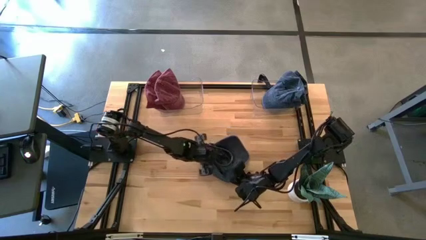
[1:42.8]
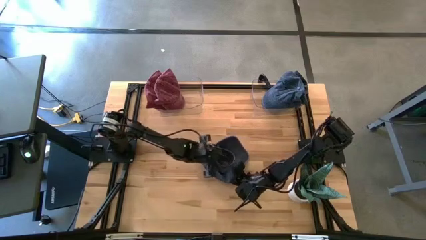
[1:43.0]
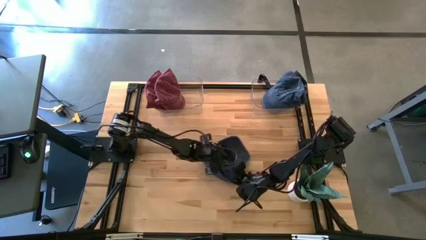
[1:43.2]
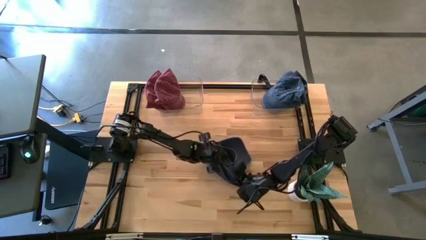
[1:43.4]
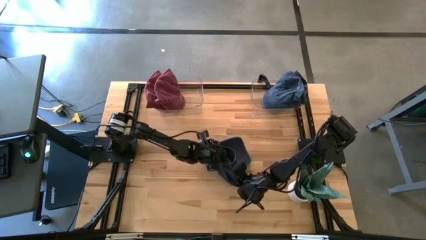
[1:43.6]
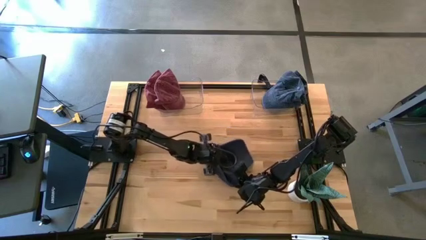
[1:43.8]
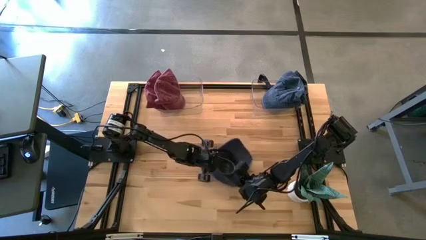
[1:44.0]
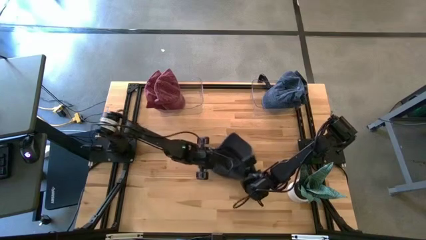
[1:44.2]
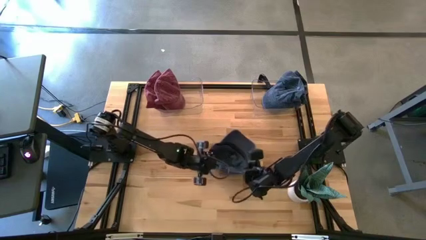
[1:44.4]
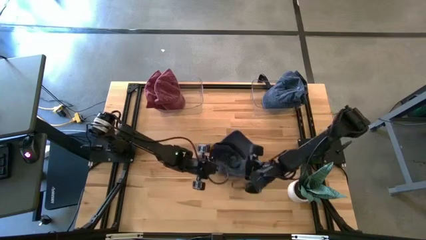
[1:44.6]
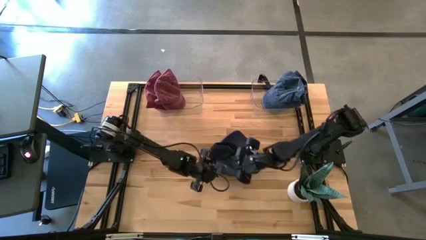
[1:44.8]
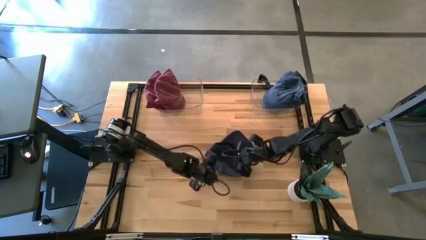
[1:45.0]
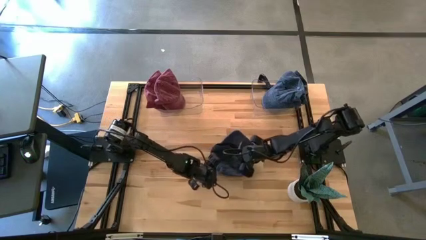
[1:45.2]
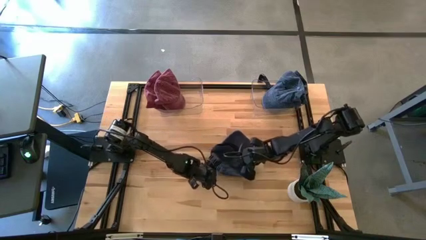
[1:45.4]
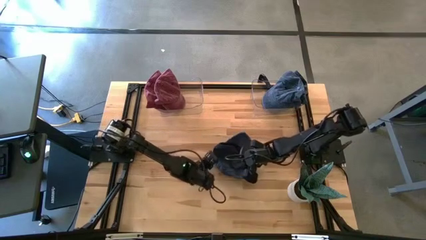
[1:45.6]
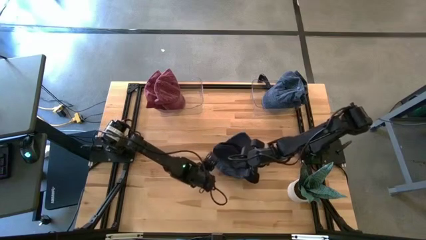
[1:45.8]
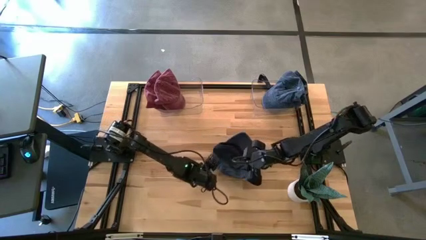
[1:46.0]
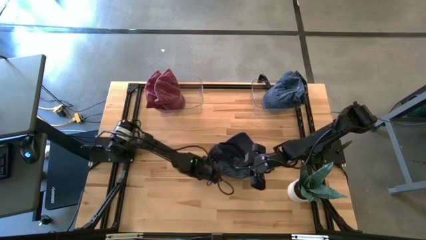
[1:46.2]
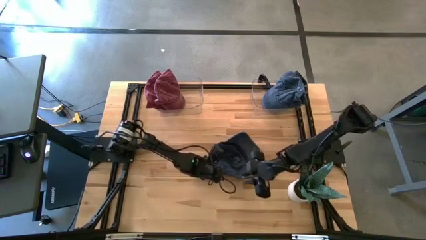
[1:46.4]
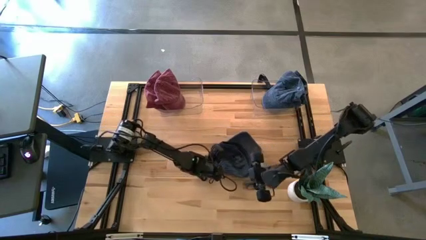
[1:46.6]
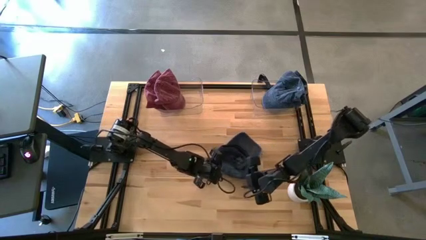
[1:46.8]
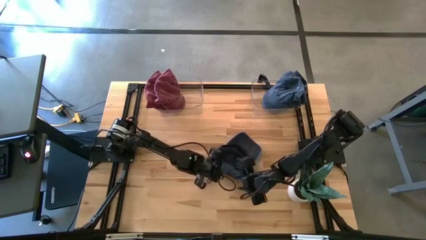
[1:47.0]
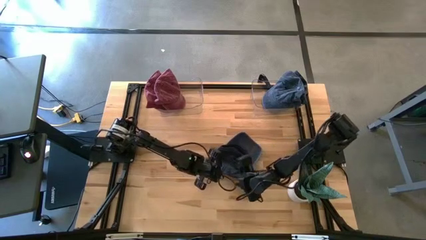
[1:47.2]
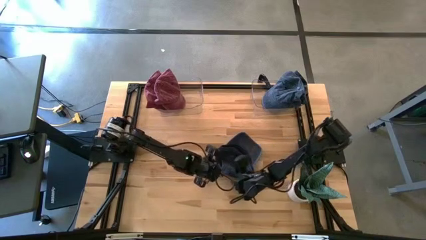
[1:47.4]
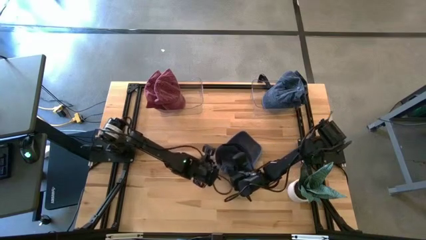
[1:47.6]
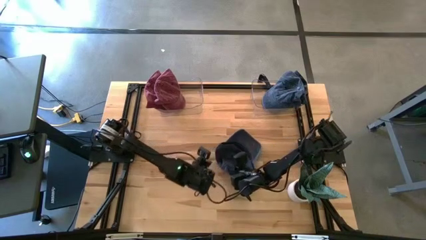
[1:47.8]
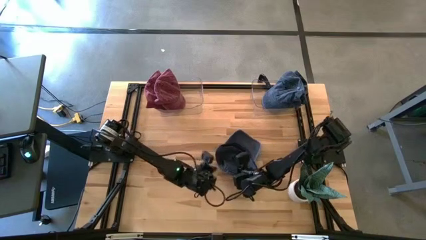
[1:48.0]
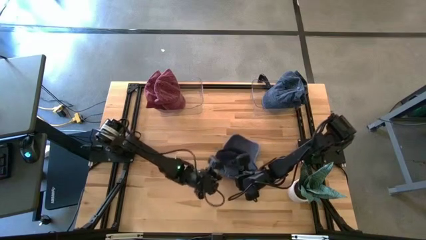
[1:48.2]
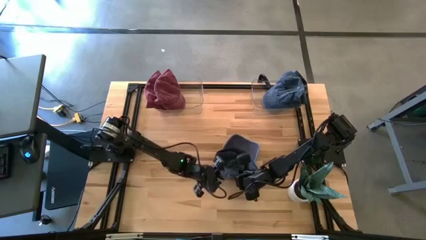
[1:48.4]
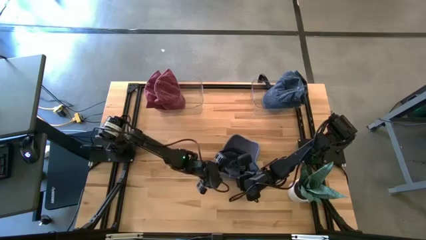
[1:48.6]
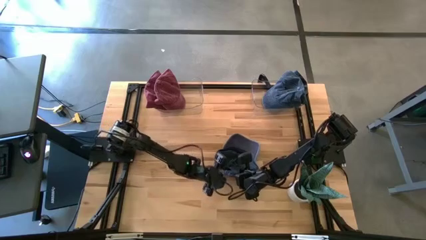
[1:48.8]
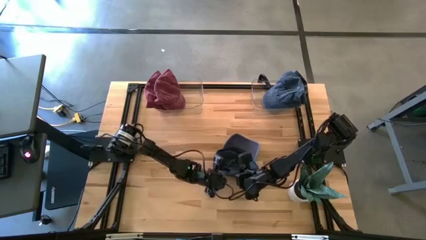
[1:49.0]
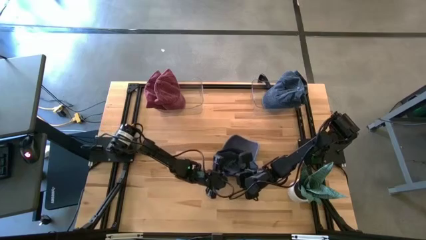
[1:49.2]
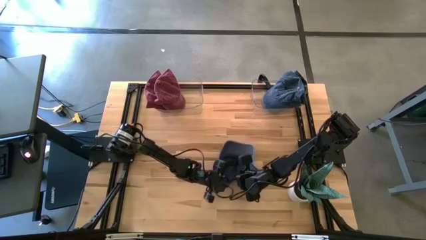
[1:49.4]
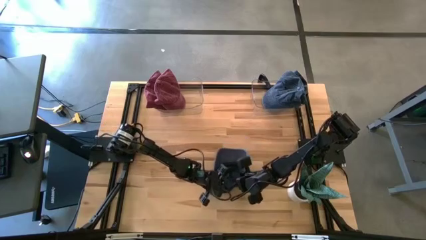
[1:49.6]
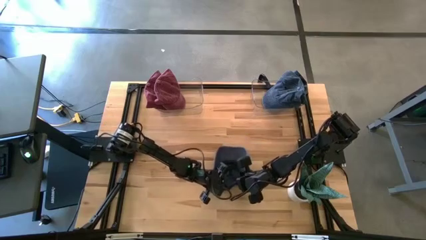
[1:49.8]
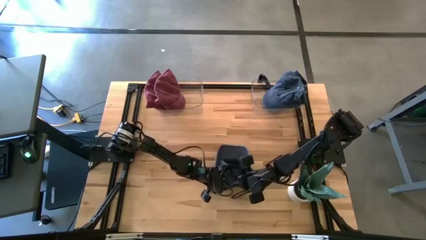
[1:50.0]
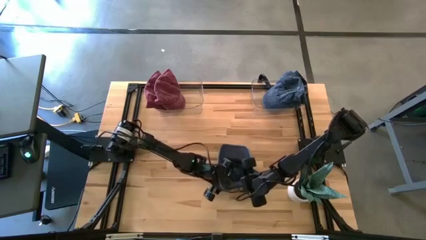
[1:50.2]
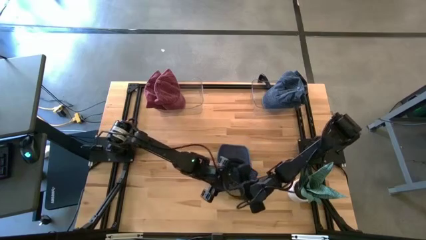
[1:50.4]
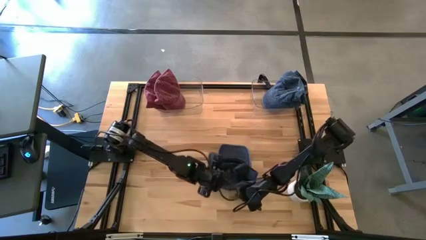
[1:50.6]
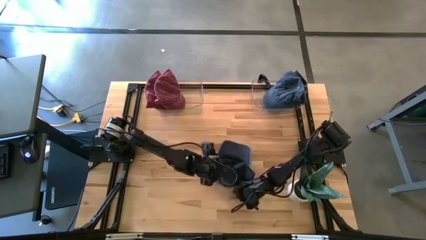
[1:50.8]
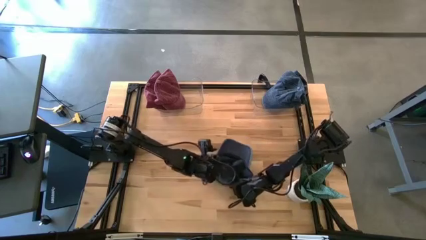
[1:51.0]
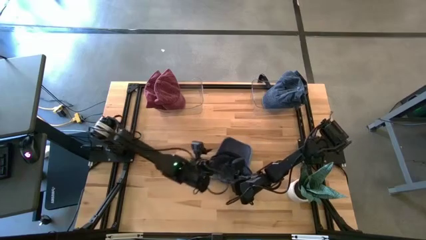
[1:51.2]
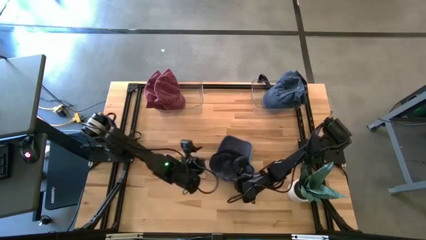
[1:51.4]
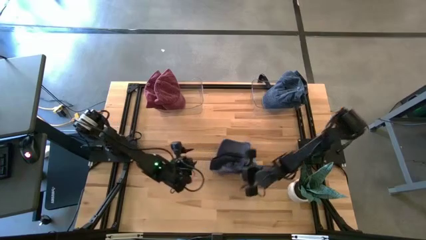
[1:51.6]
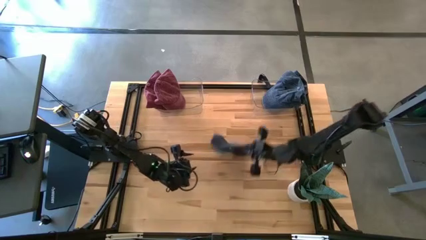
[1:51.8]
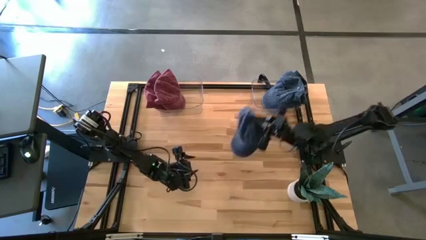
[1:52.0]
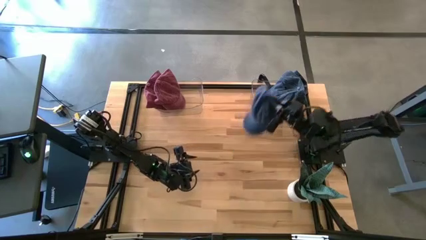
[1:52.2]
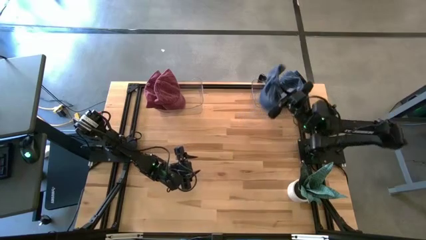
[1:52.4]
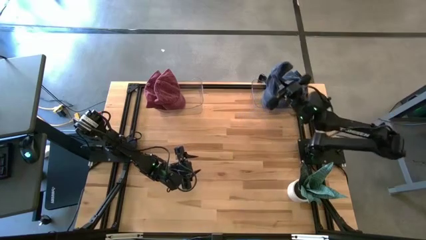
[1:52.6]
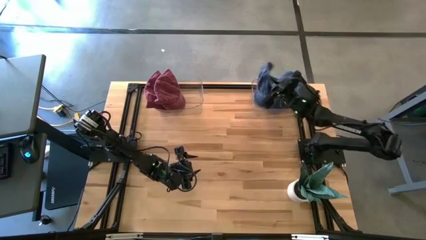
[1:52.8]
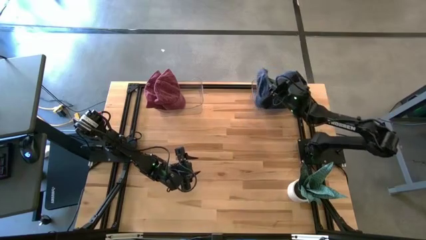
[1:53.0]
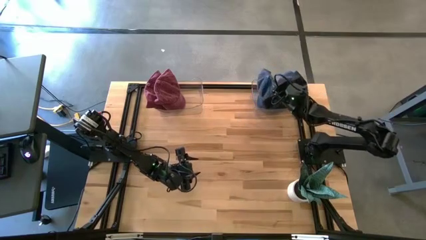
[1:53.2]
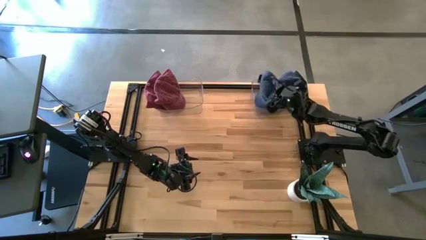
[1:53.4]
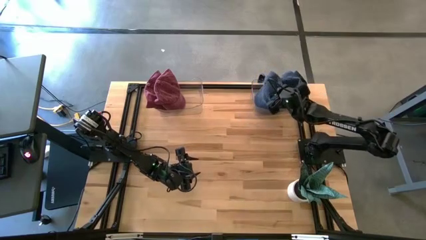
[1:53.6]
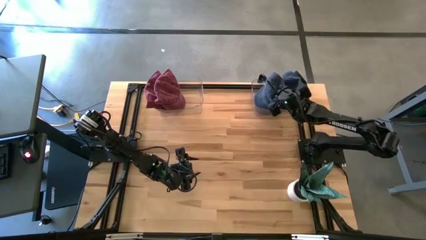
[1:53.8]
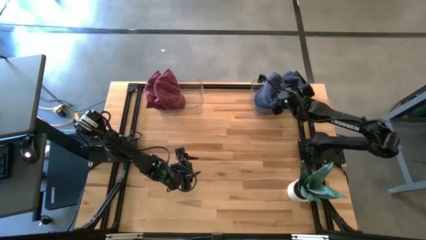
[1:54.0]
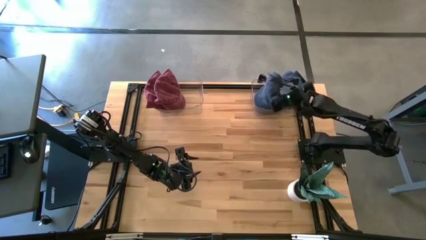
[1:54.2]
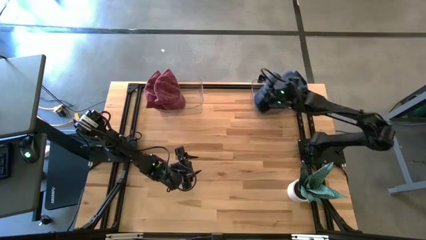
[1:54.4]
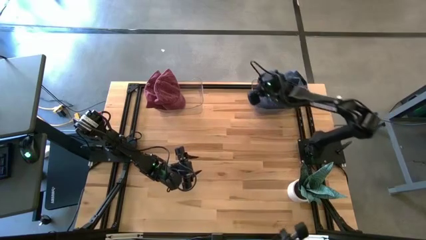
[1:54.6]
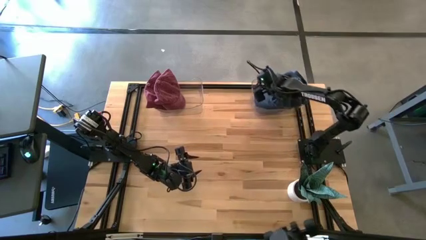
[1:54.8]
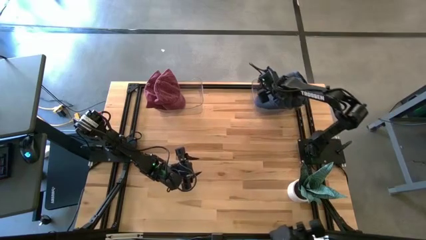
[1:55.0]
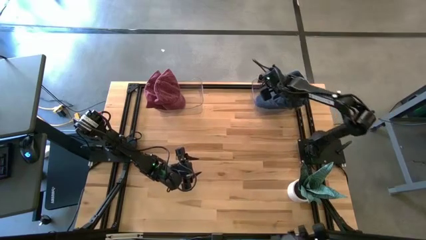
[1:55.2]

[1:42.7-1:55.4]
Task: Pick & Place hat
Put the blue cap into the right transparent bin
